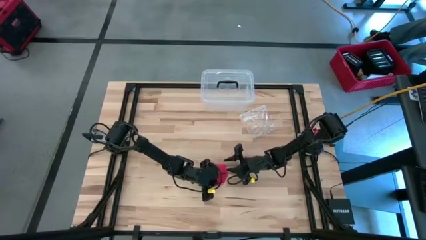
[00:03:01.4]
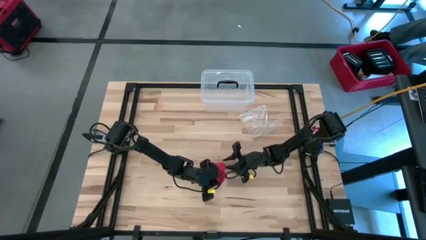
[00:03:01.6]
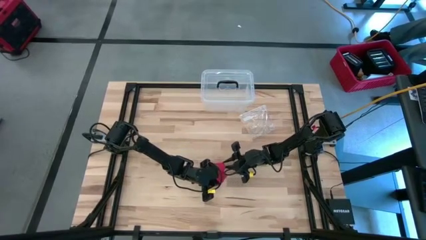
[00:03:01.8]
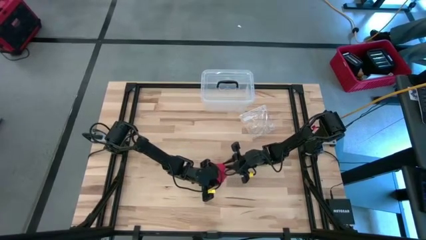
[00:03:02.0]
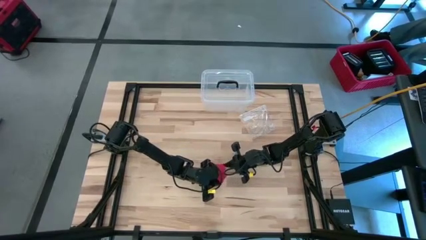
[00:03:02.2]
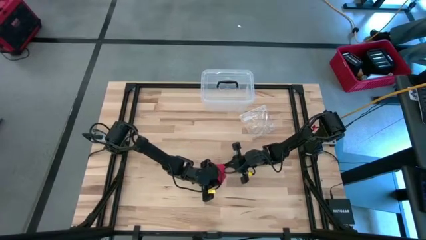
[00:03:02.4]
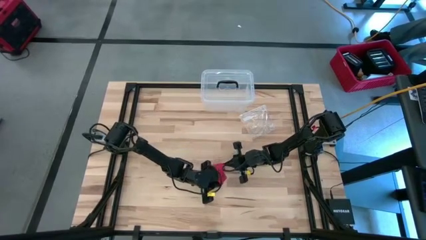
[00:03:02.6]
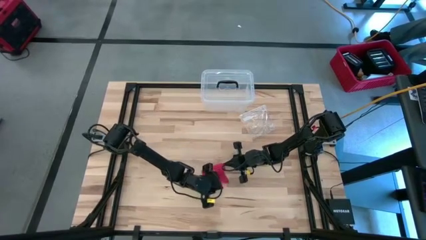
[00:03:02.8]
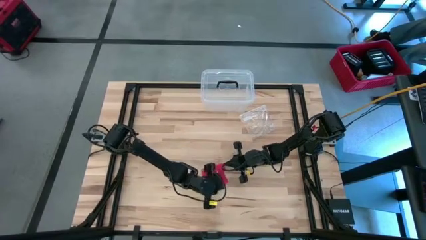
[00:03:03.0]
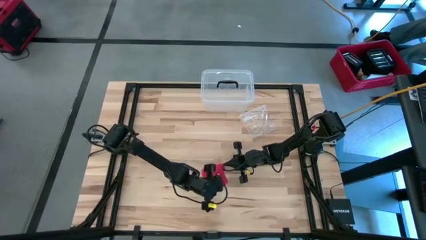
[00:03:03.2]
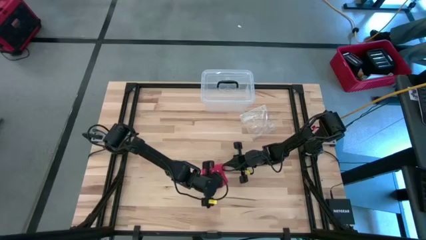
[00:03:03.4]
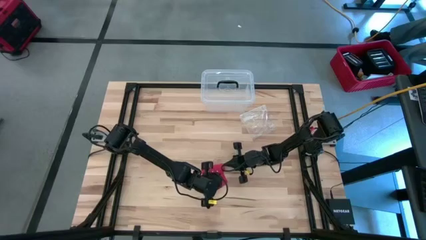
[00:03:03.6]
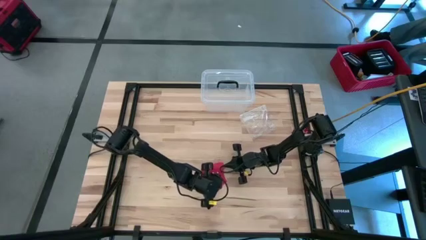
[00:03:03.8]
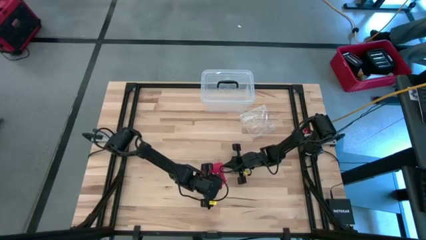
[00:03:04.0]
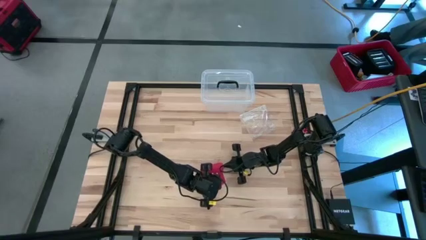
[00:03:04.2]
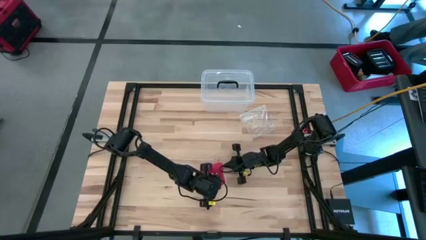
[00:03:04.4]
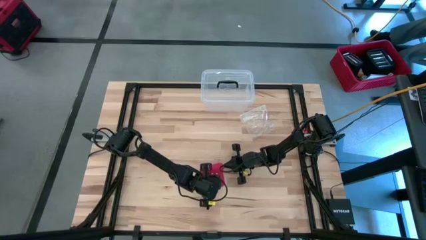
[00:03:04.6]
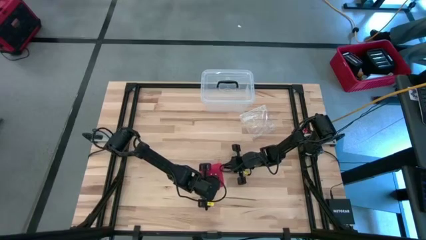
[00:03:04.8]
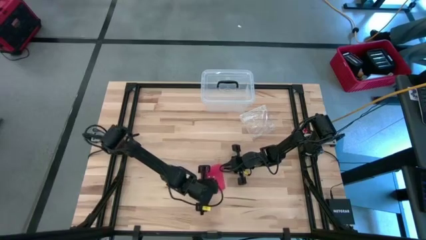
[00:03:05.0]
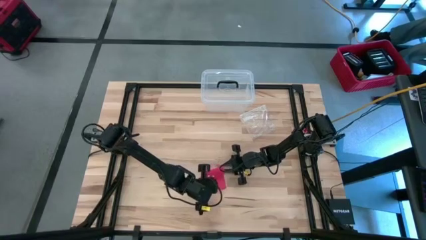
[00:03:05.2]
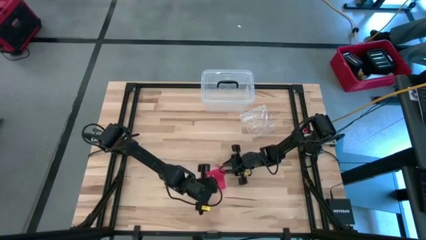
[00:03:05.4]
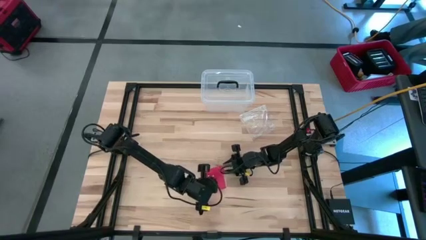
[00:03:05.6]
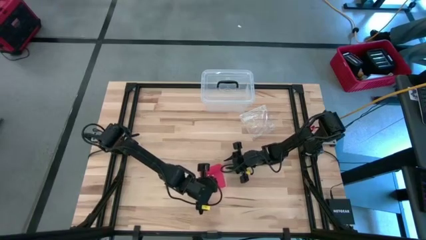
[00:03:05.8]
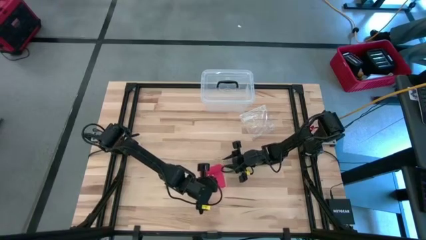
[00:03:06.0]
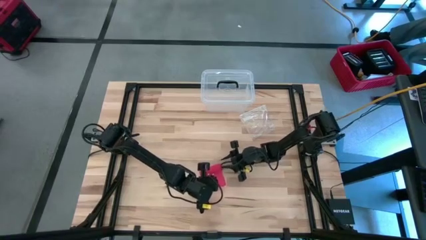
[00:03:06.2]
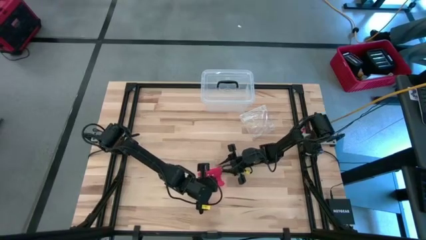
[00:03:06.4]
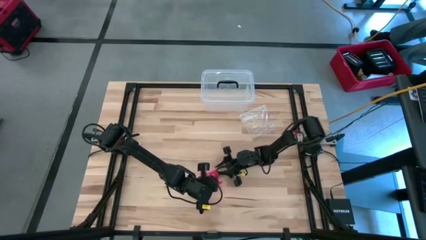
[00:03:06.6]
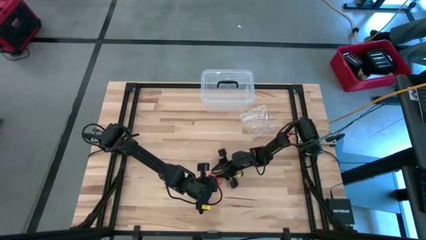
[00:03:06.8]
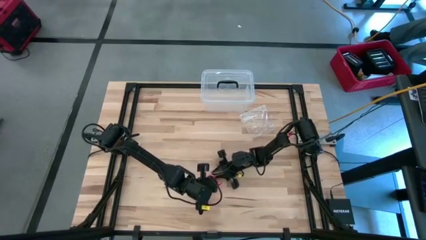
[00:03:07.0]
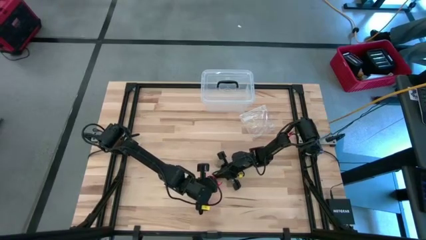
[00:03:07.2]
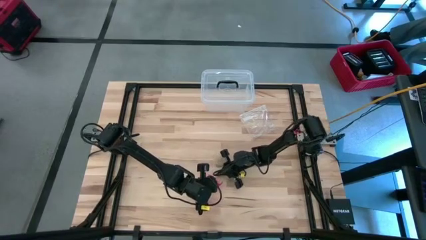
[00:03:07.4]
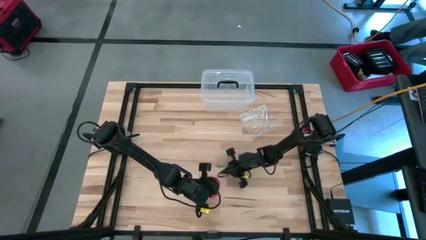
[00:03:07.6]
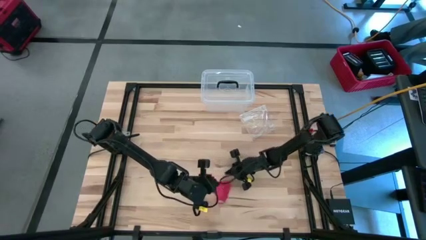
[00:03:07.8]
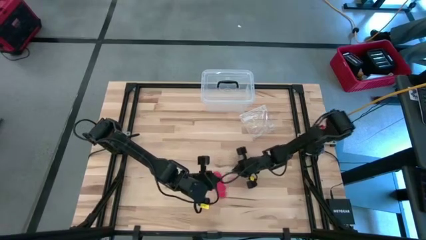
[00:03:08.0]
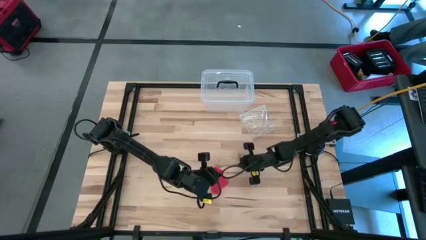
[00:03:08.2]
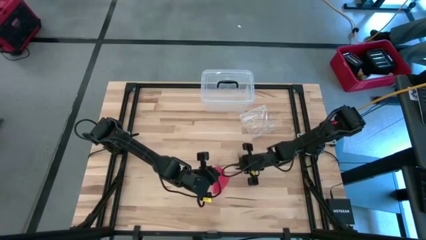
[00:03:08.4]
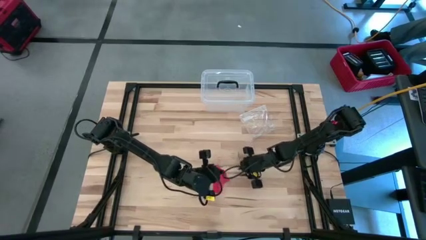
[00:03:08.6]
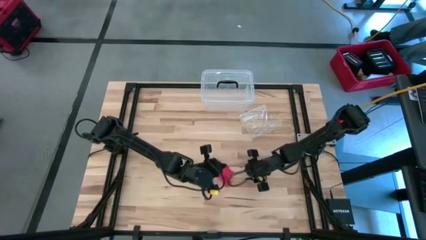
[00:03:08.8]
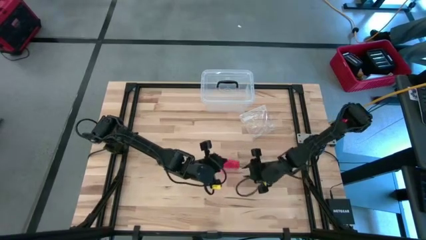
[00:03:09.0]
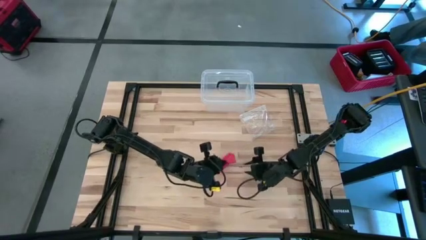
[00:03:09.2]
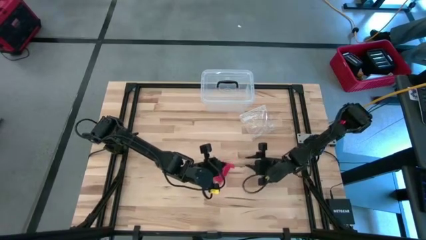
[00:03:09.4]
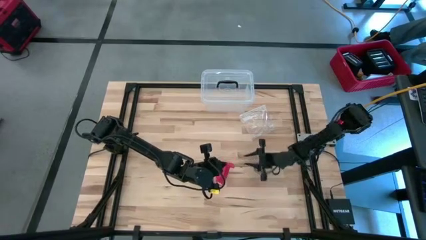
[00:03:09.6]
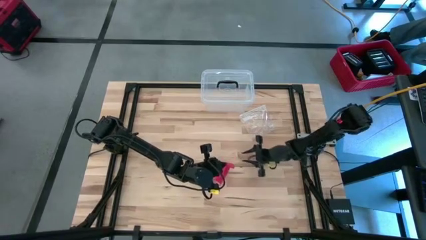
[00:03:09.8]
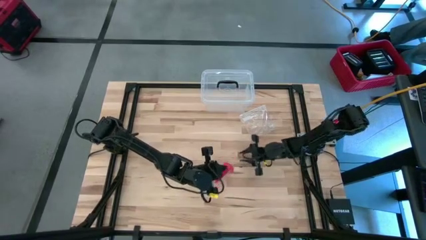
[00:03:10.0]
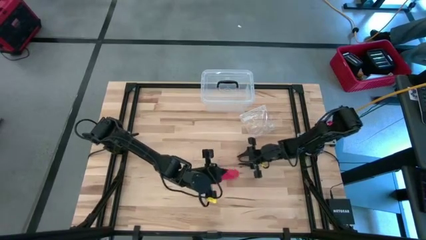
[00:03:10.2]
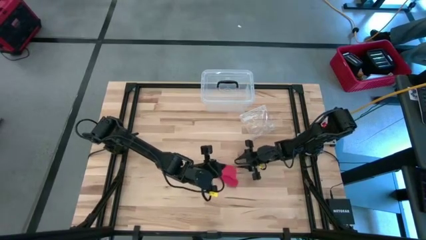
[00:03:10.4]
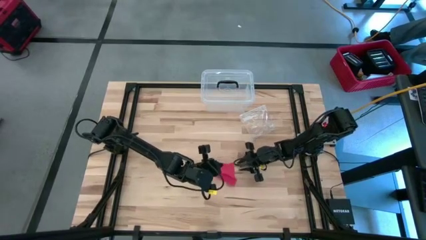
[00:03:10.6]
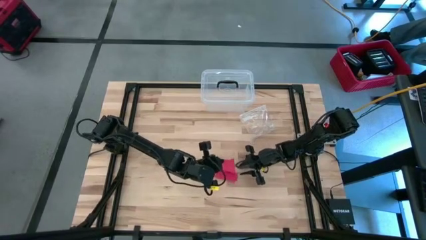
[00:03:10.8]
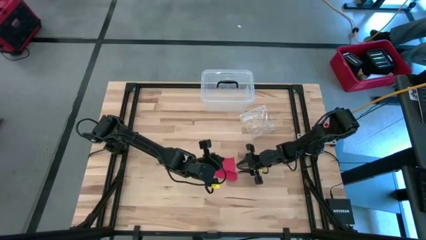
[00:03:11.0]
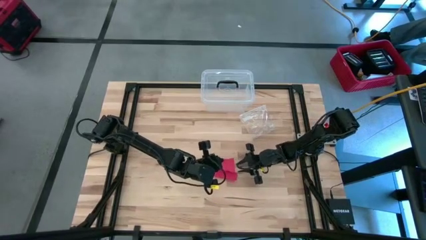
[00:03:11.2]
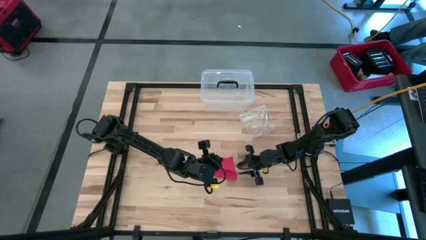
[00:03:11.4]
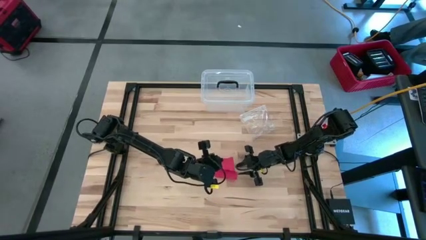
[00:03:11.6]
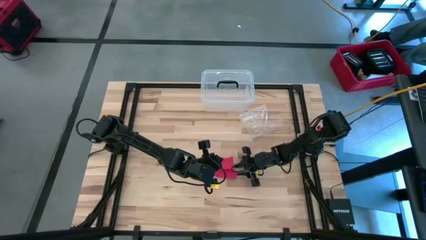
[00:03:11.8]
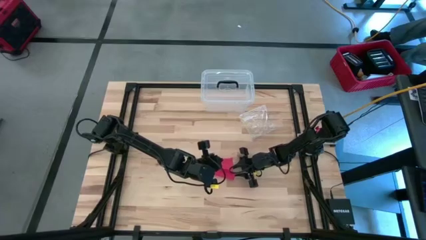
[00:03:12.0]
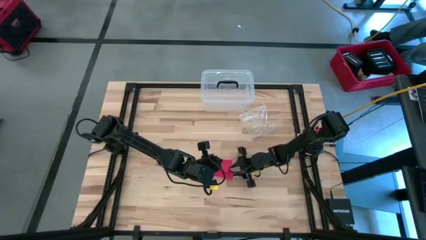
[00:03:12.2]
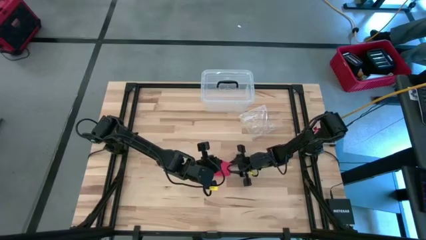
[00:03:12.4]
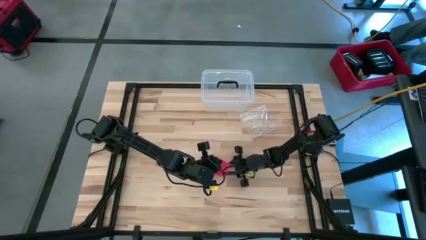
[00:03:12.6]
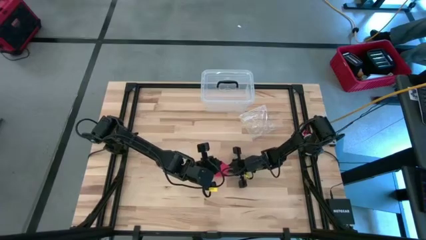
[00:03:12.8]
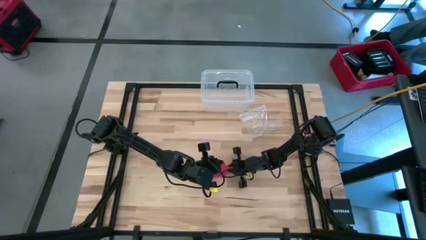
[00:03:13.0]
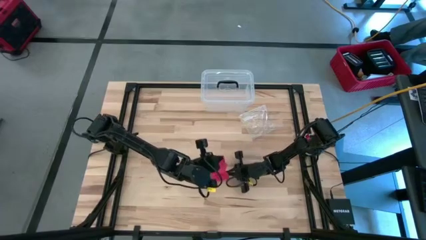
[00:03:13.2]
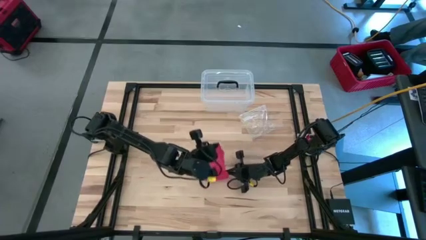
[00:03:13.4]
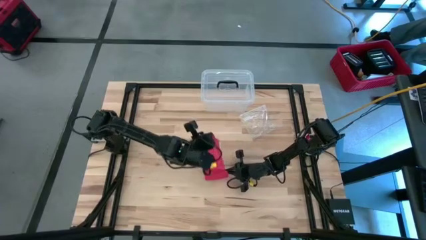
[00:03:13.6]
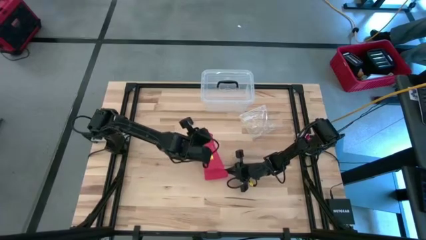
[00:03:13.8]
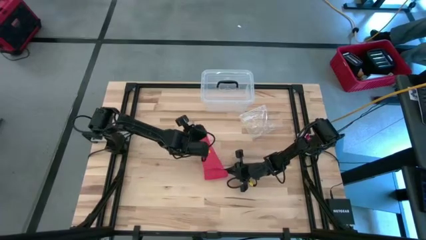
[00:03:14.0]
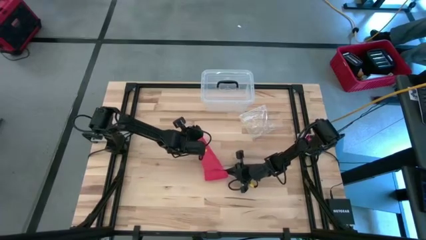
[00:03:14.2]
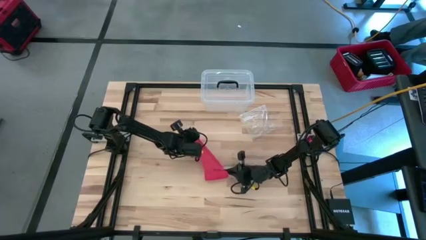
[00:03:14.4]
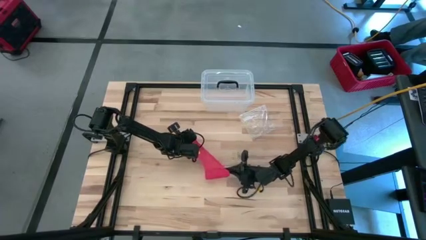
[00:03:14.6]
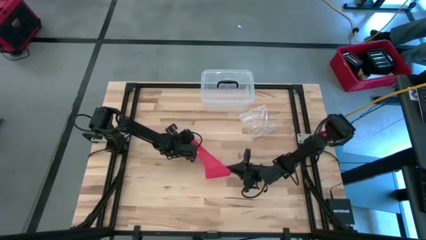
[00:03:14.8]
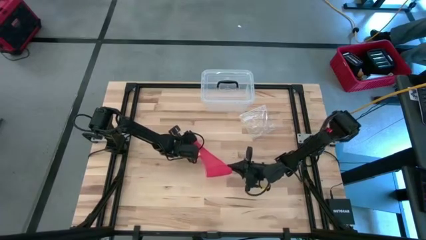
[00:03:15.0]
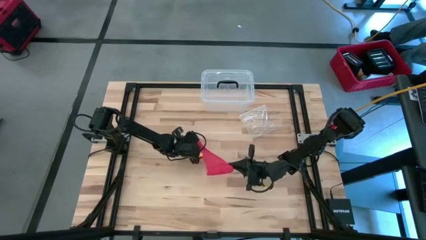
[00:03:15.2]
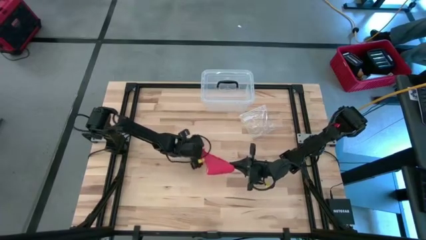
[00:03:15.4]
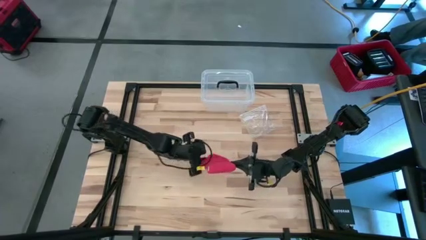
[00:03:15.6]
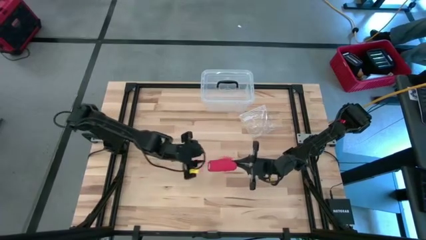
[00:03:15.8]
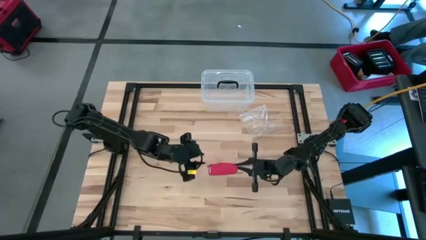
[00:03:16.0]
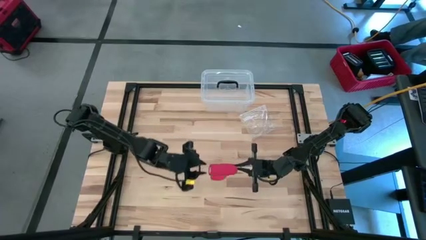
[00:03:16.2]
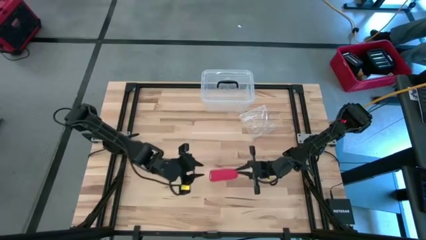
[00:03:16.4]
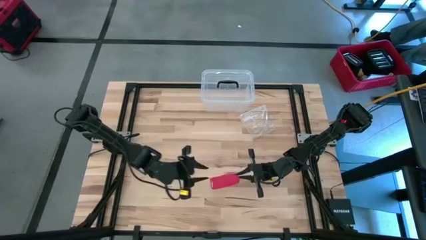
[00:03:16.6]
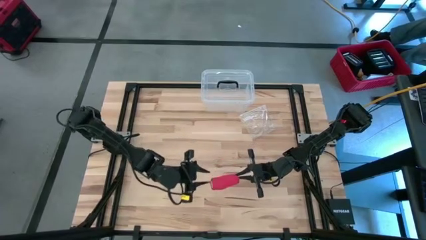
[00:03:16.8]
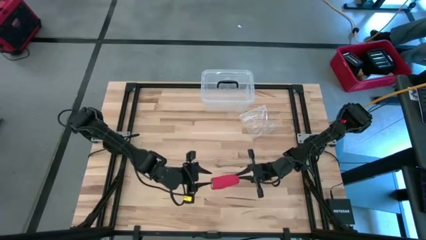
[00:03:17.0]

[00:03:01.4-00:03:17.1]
Task: Roll bandage
Roll the red bandage

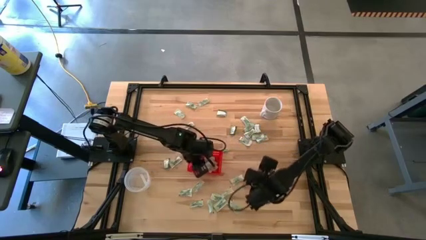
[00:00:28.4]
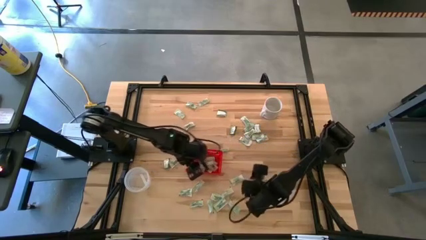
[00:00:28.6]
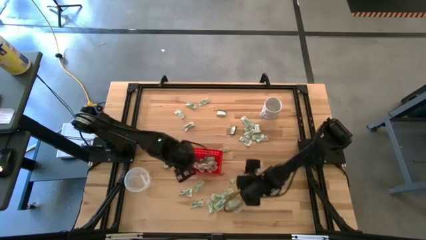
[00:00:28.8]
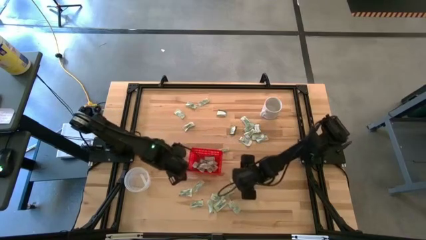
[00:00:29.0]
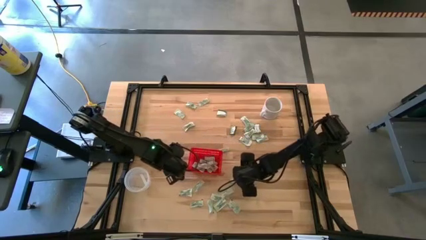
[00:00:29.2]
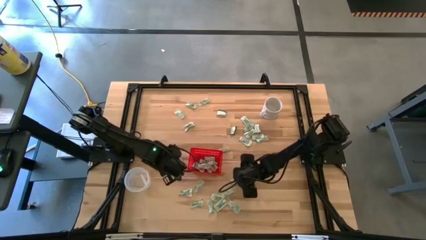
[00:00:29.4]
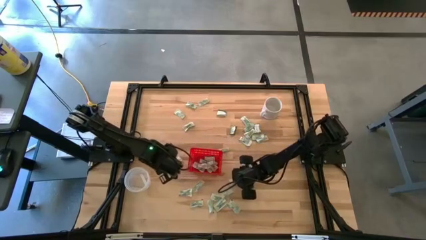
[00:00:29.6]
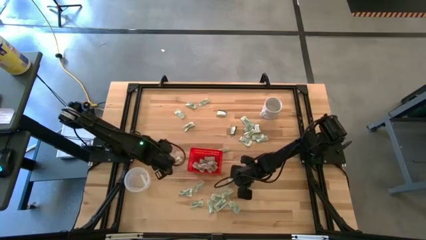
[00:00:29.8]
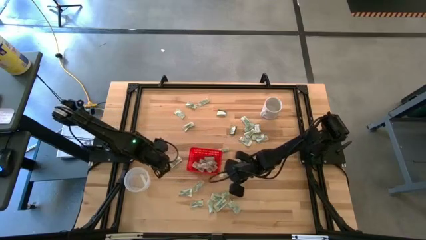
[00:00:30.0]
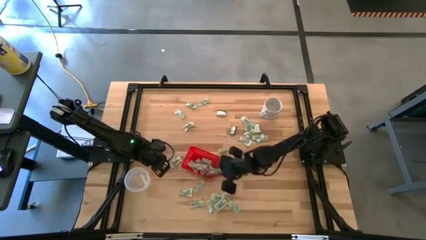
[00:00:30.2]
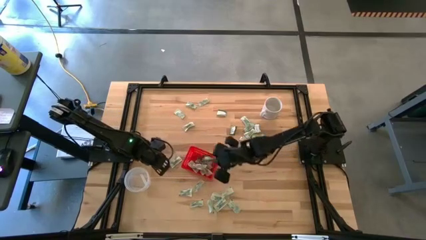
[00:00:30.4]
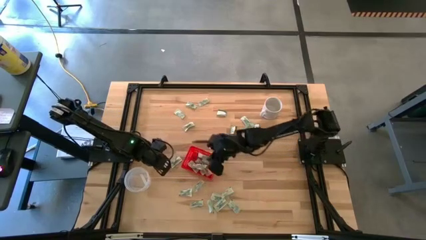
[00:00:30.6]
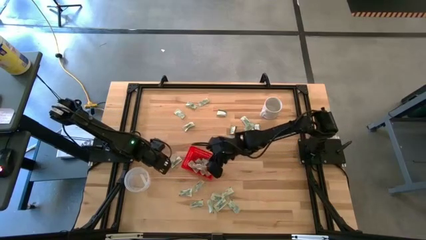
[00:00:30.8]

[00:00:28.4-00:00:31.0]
Task: Pick and place Stevia / Truvia into bins
Put the green stevia packet into the red basket
